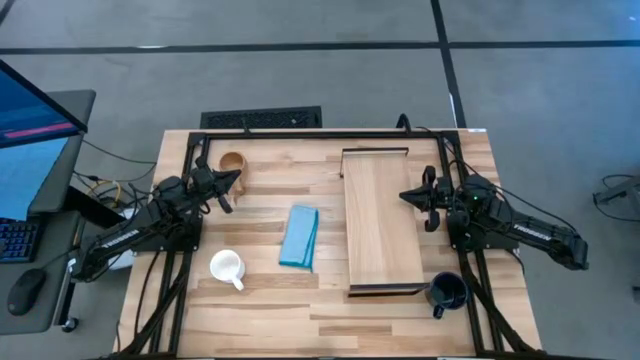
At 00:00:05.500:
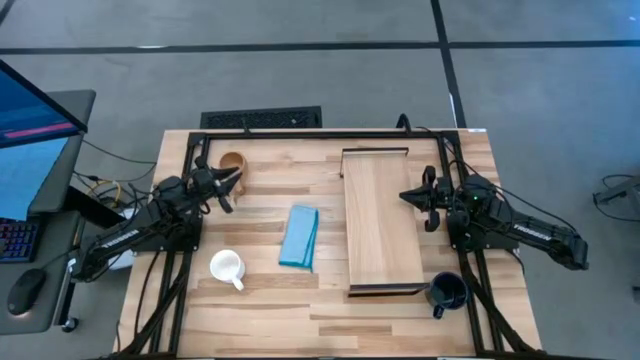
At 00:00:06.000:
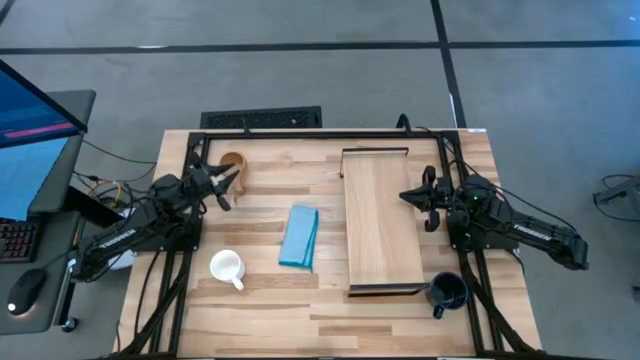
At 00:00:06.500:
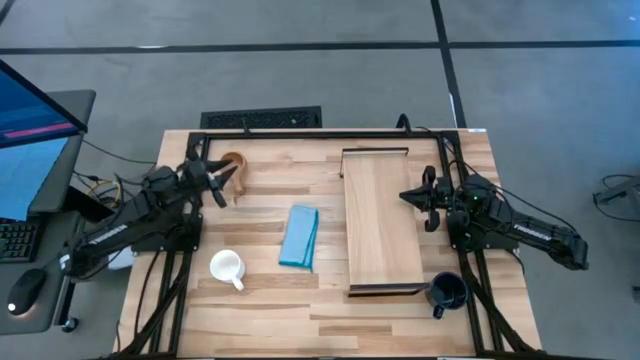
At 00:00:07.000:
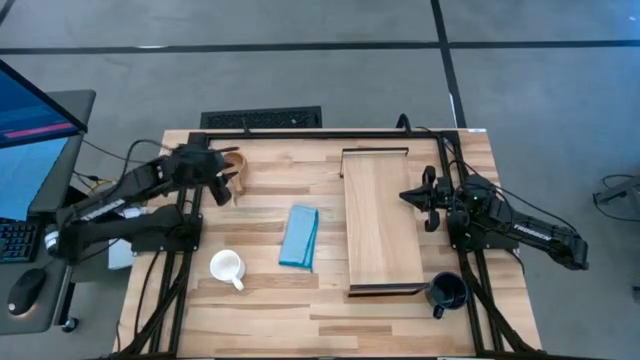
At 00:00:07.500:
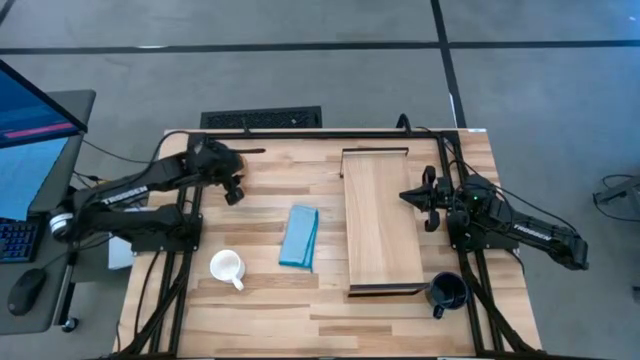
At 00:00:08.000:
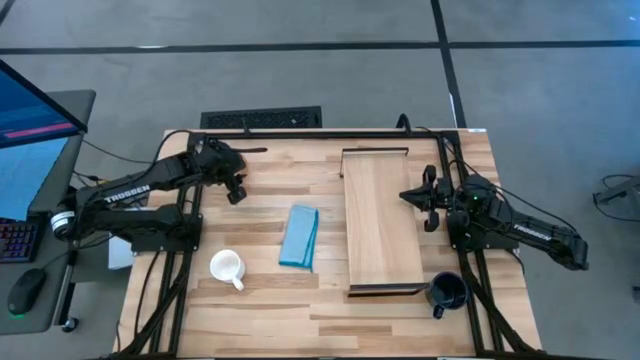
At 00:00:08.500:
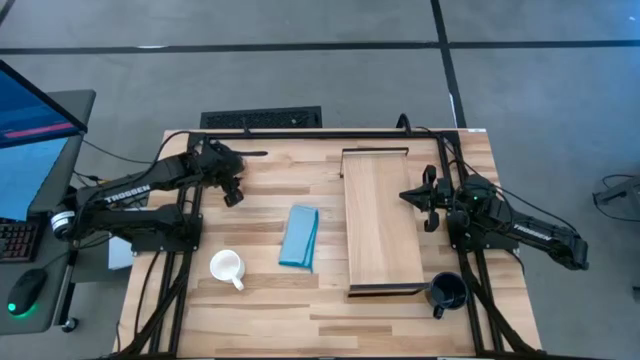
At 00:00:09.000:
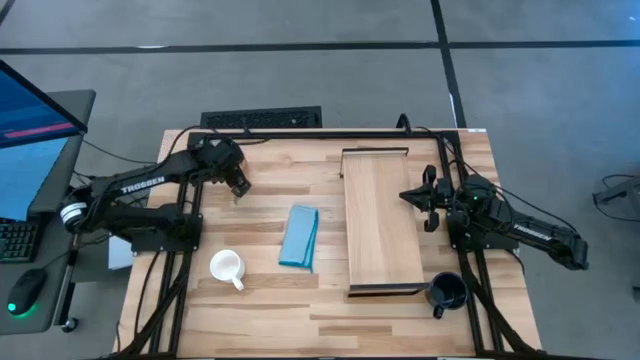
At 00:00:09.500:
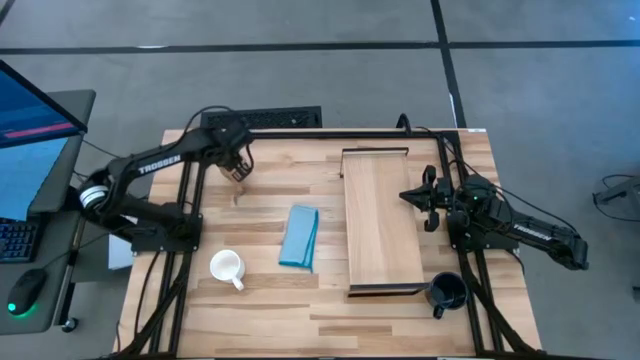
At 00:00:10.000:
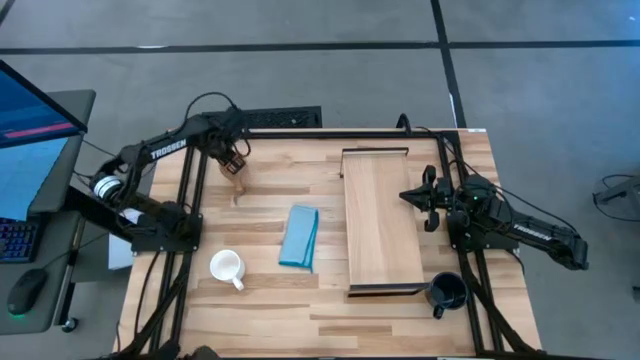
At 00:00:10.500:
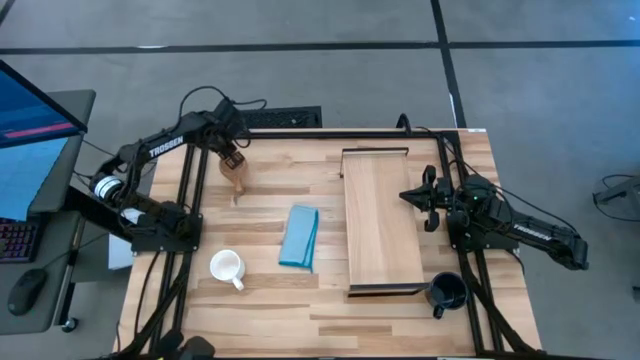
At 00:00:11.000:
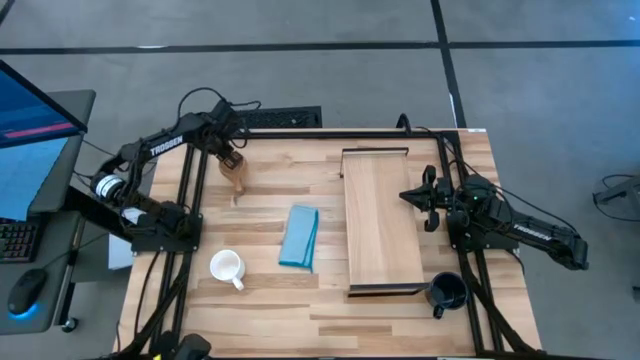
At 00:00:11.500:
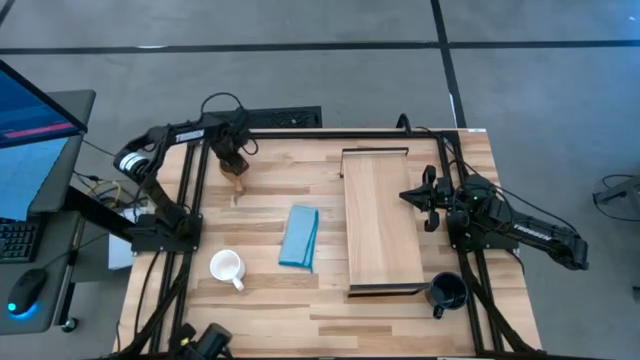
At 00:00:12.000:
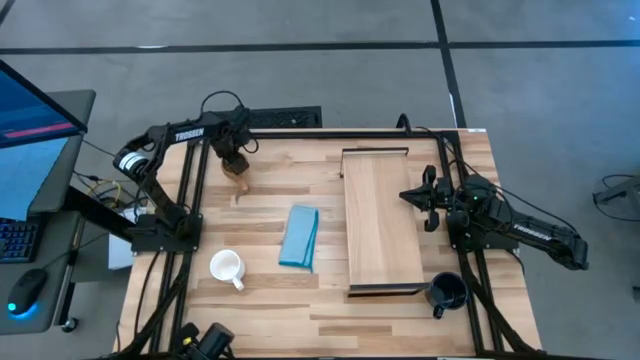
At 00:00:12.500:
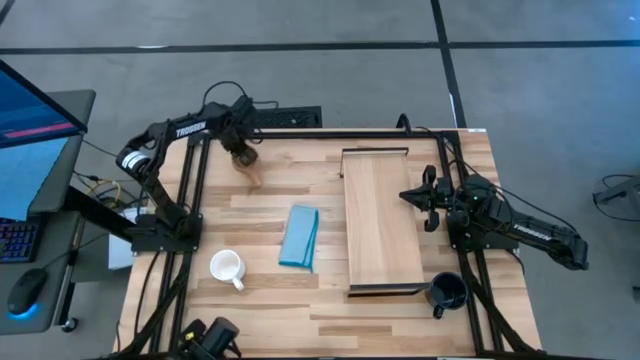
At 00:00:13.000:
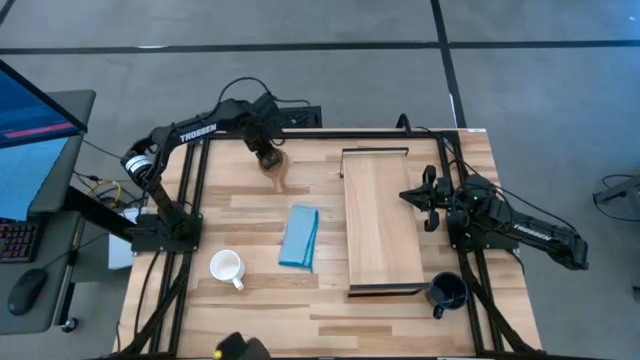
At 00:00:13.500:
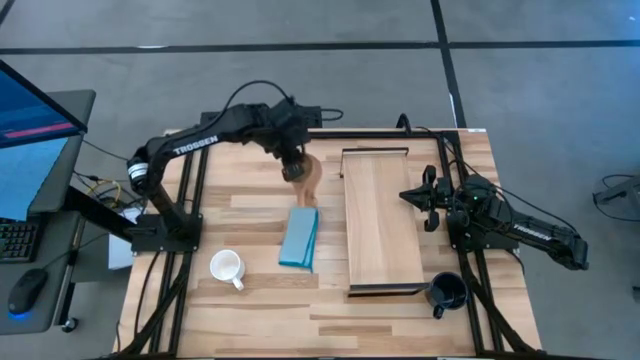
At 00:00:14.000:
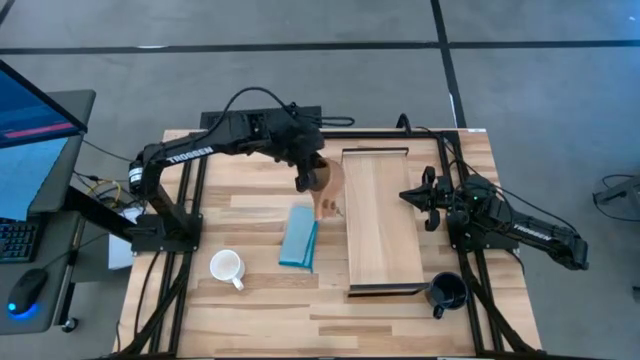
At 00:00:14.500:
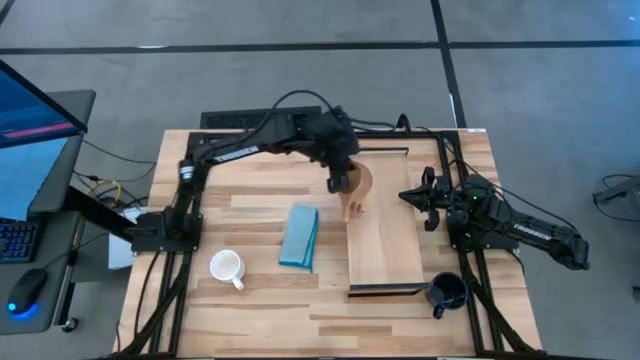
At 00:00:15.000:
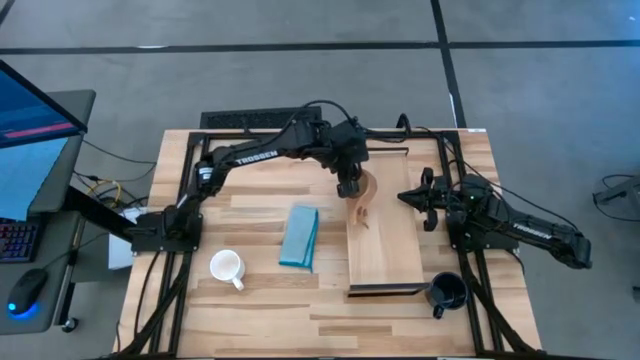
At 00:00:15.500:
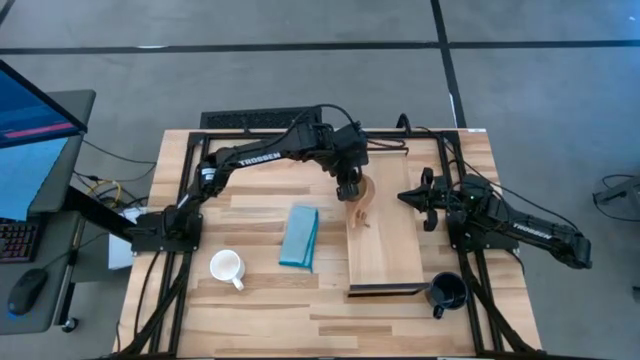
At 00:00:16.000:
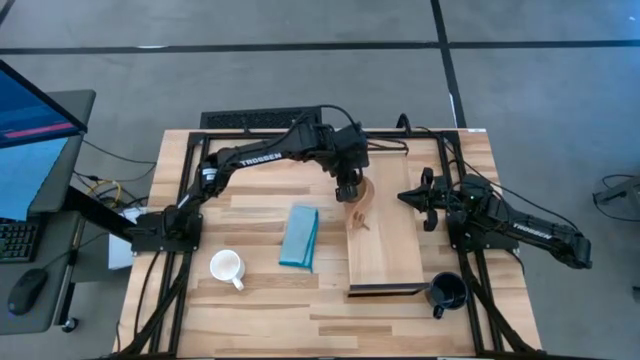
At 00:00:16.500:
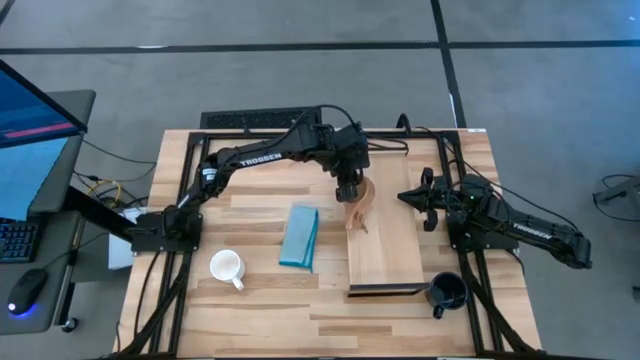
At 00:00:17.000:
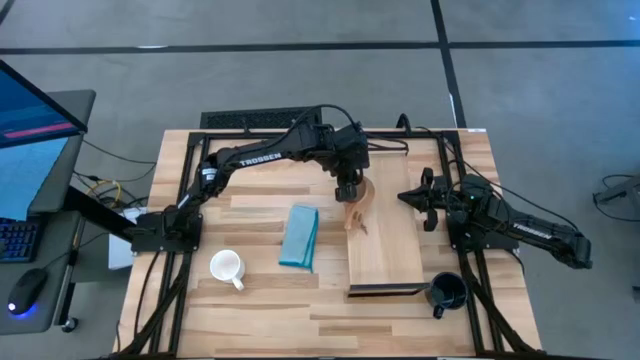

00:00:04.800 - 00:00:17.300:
Task: Stack small to large cups/mugs on shelf
Put the brown mug on the shelf
